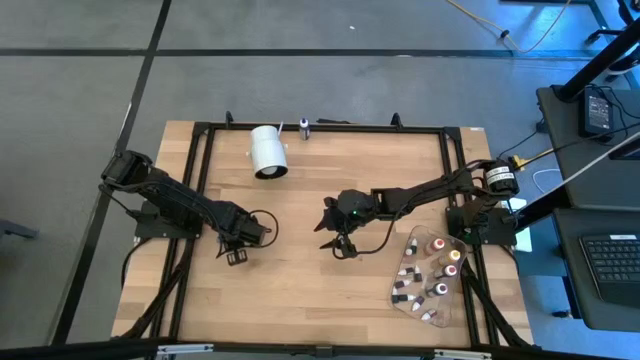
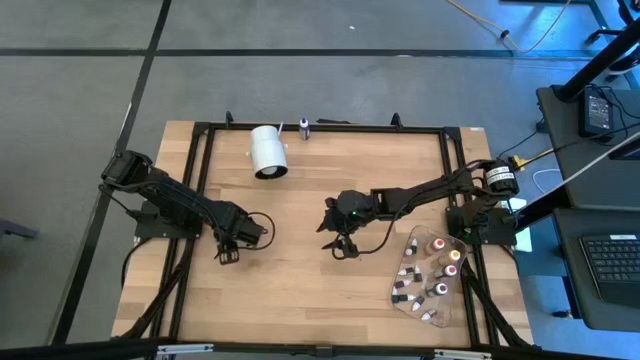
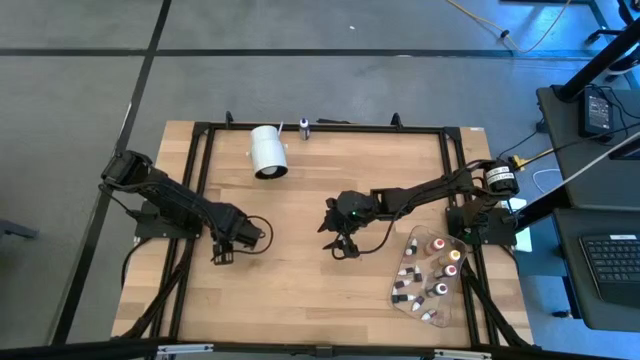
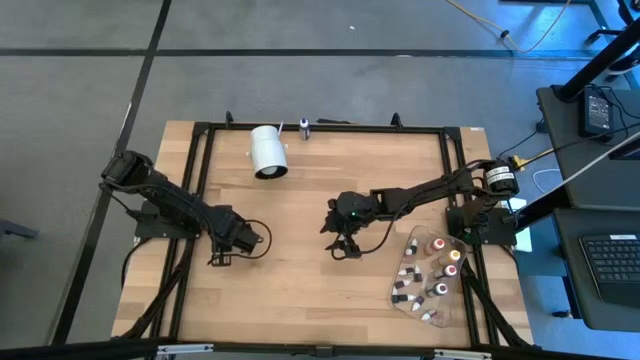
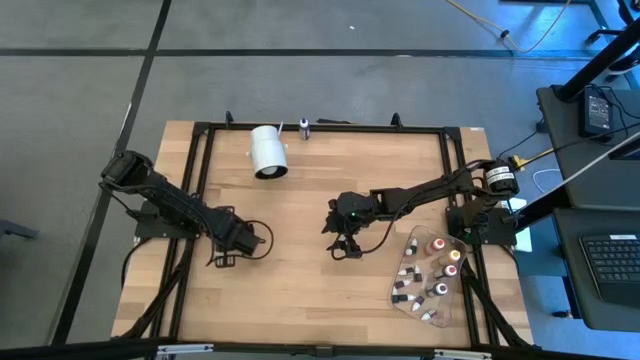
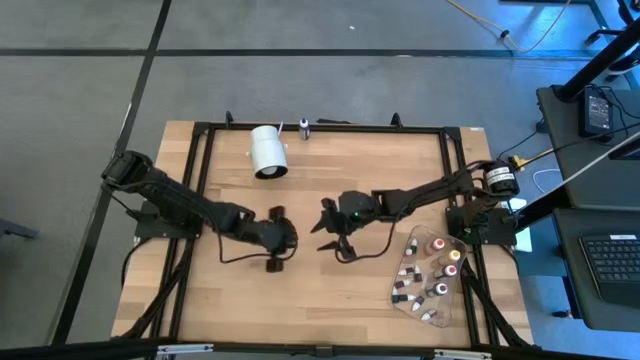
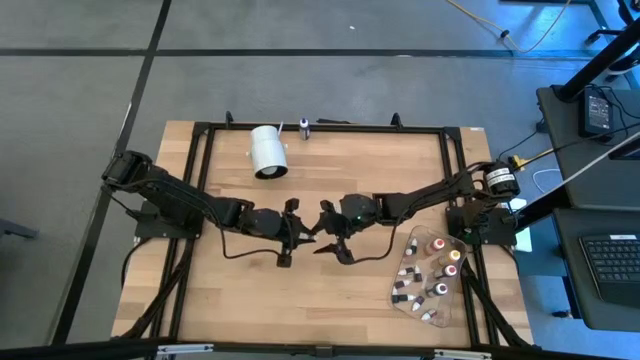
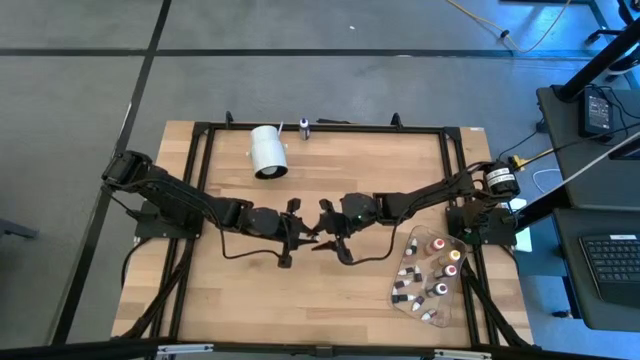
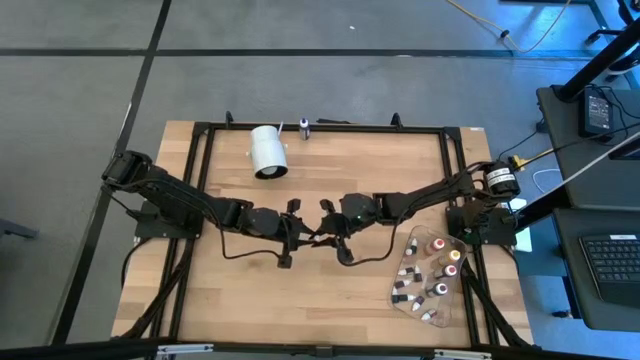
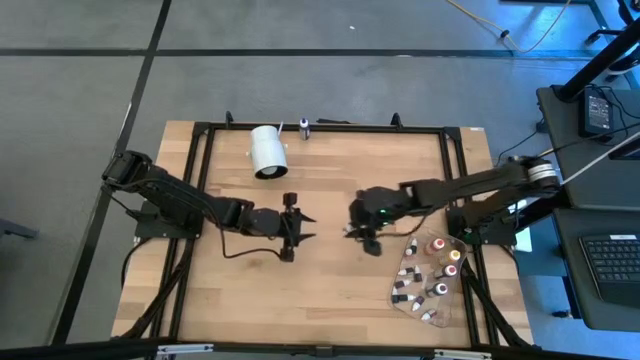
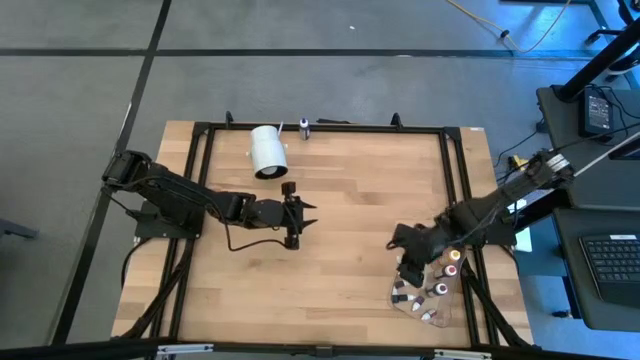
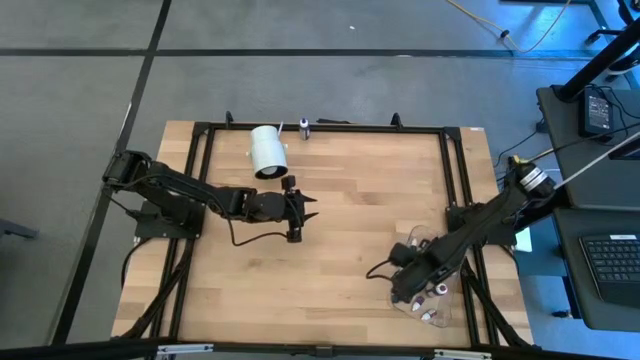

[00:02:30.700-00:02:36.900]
Task: Pick & Place food coloring
Put the small blue food coloring bottle into the transparent bin

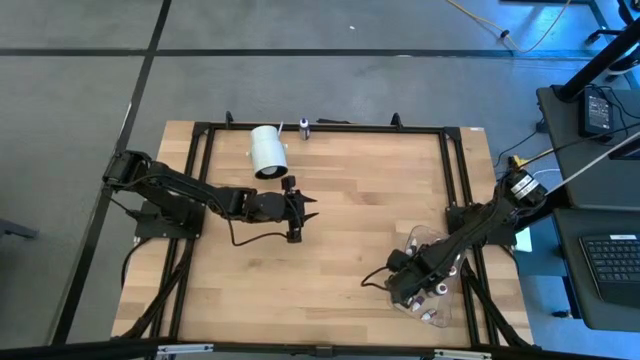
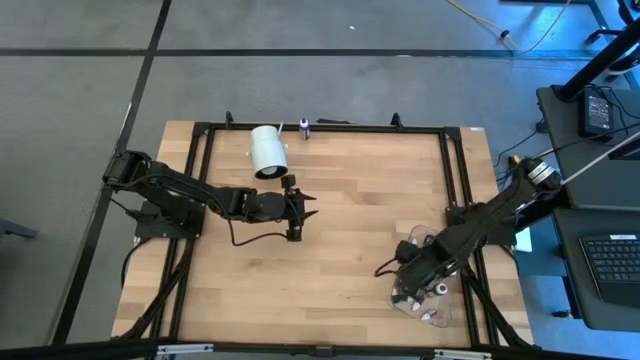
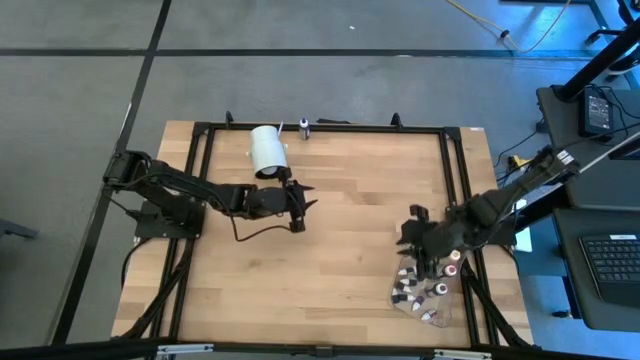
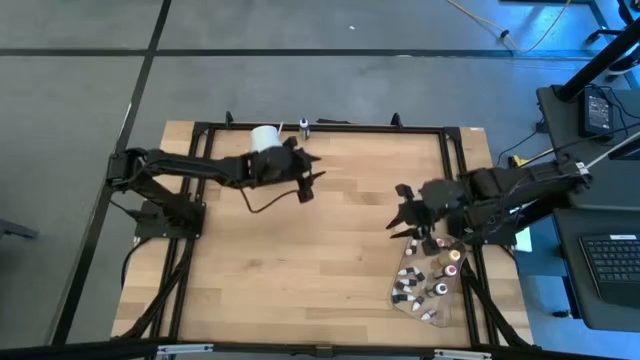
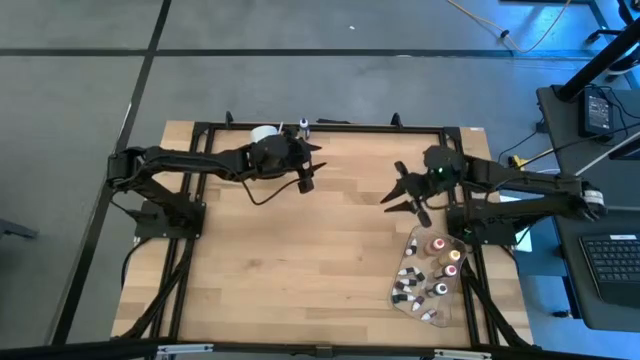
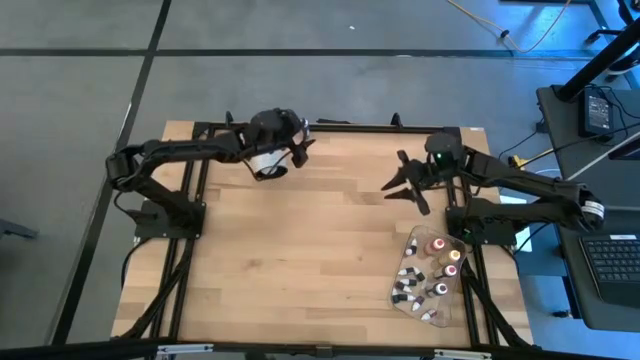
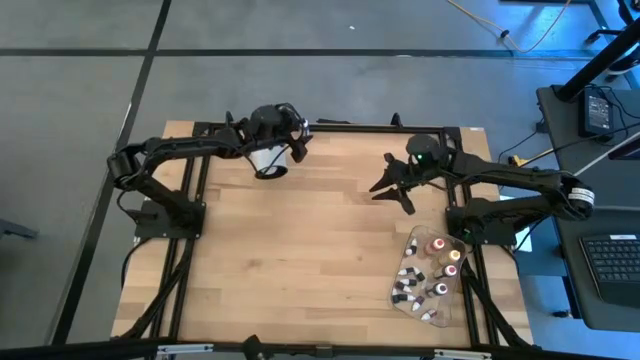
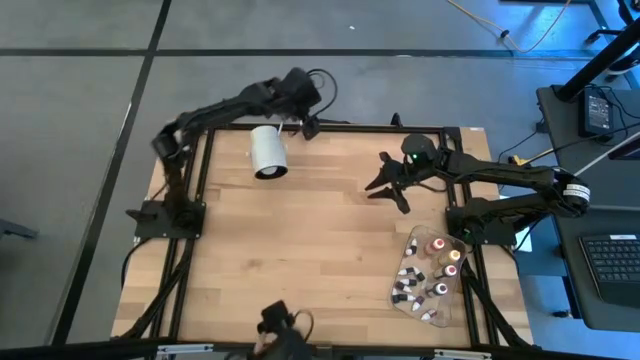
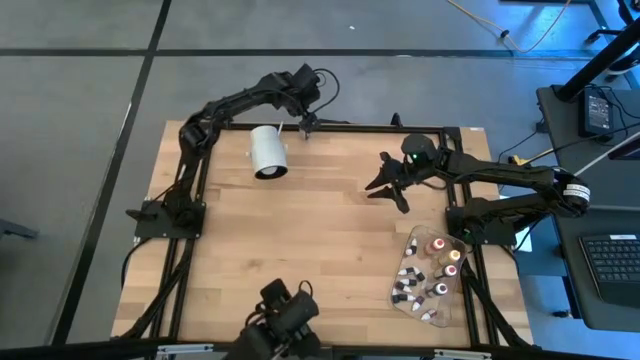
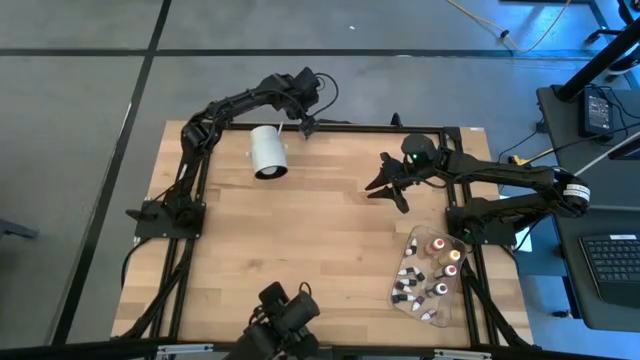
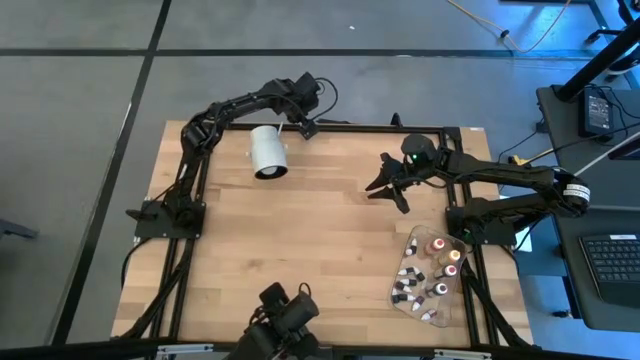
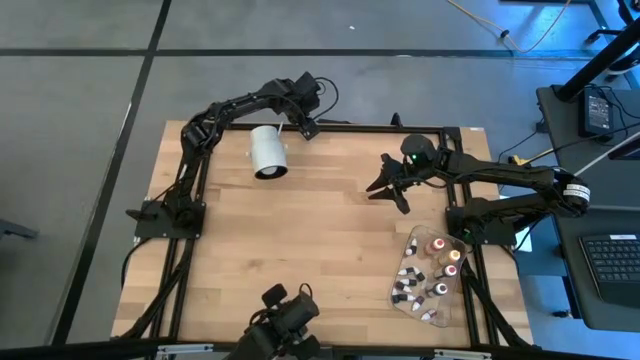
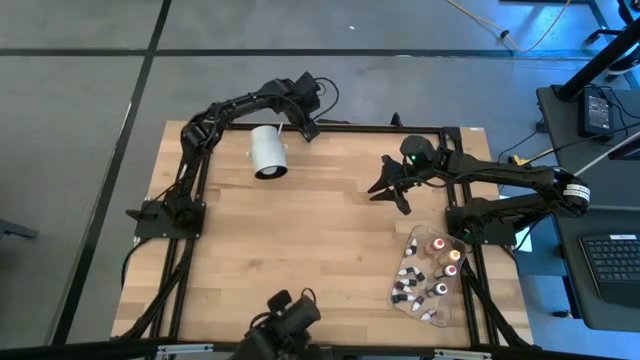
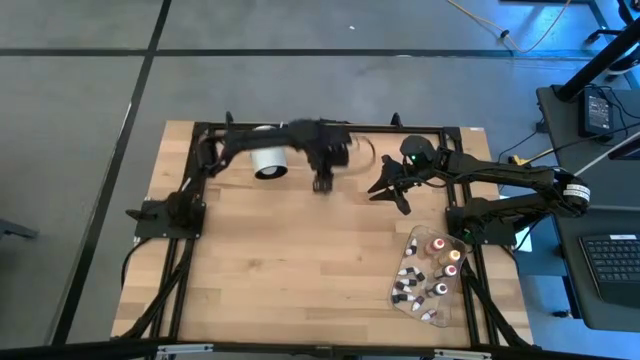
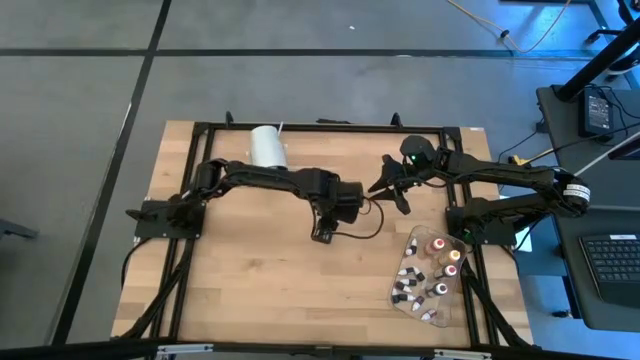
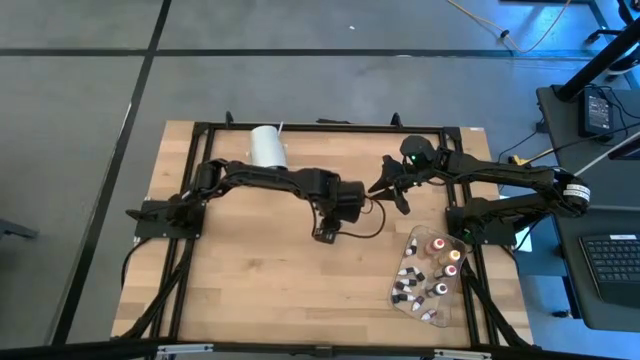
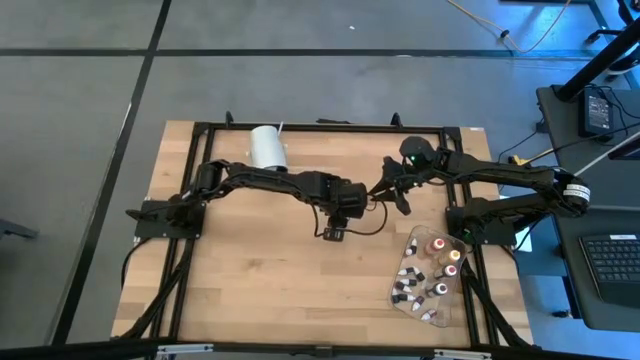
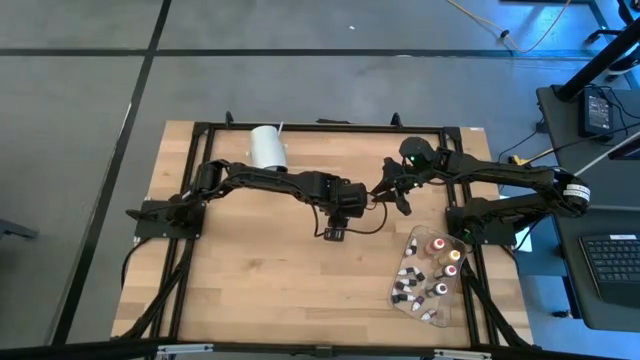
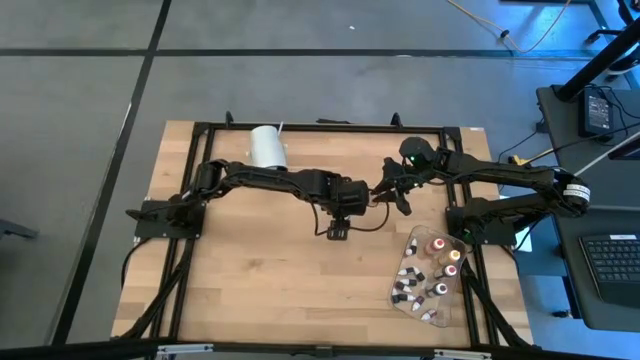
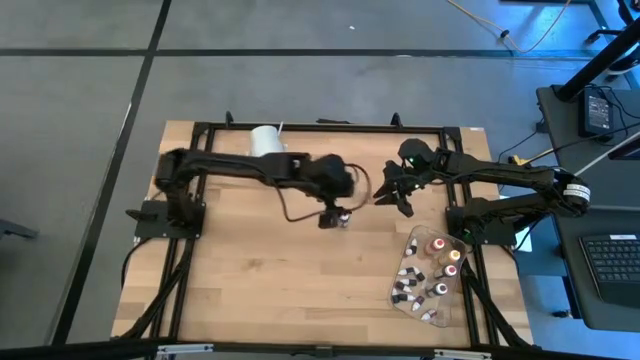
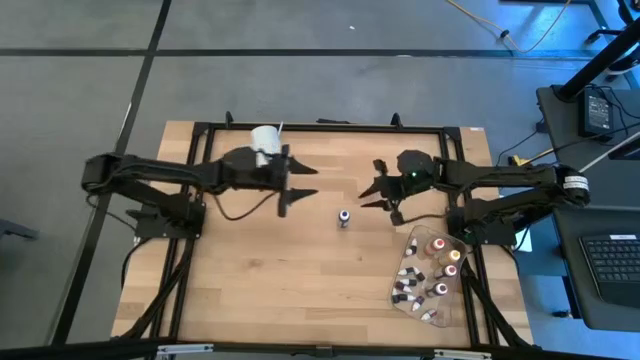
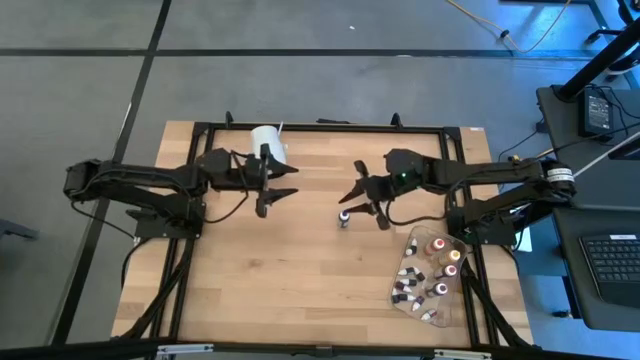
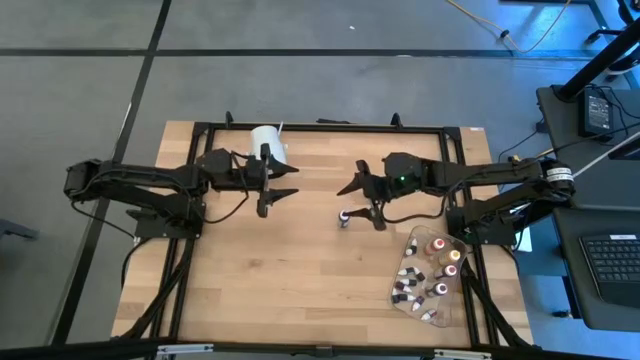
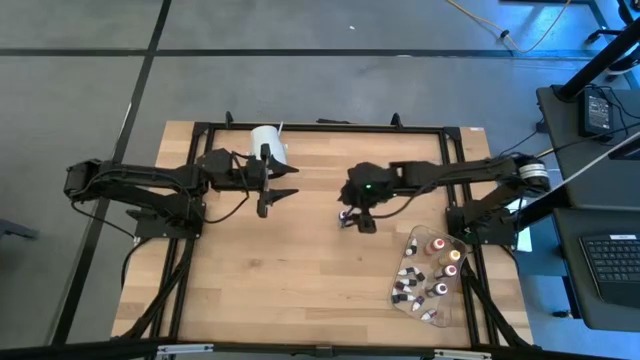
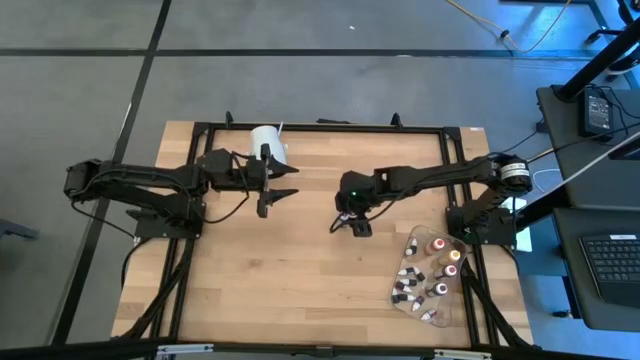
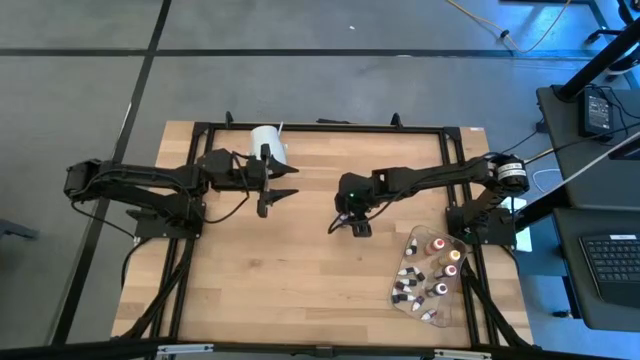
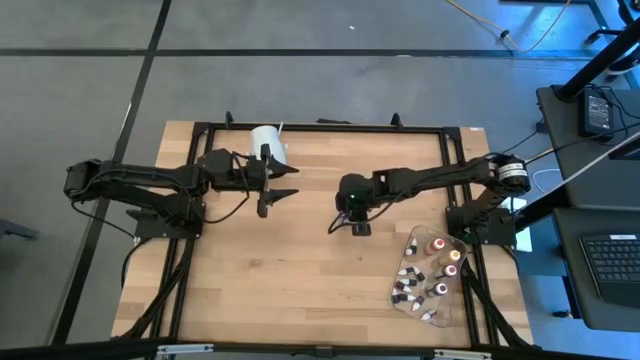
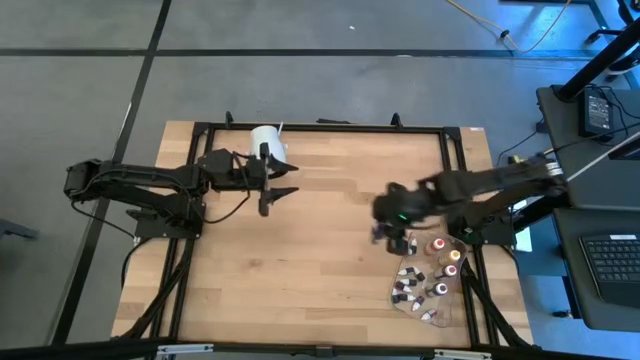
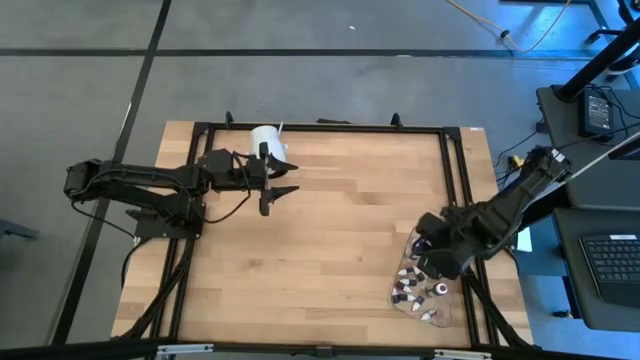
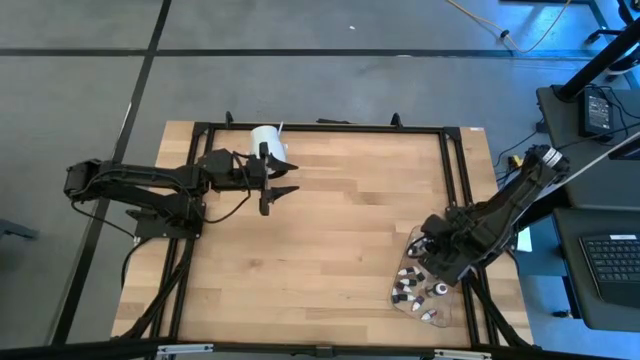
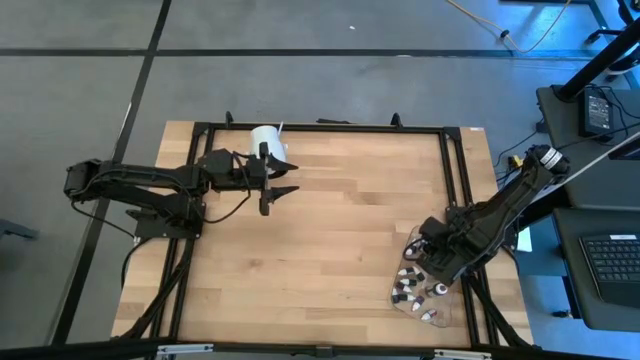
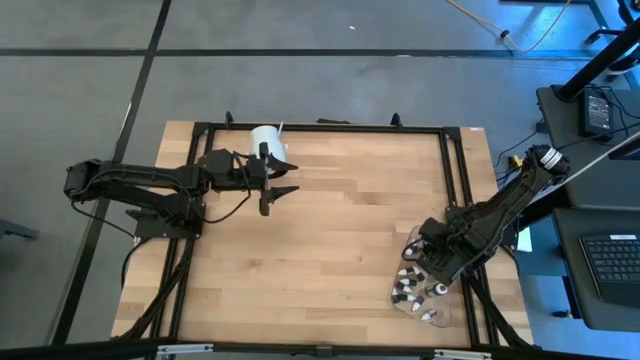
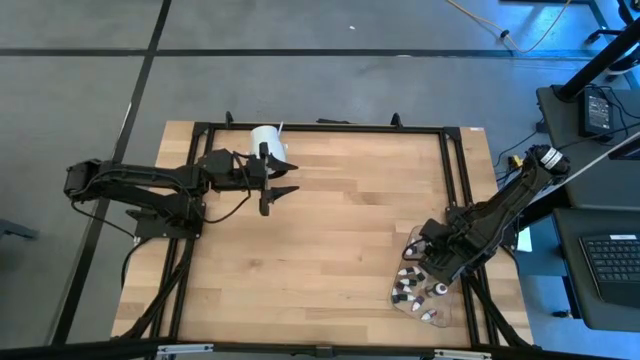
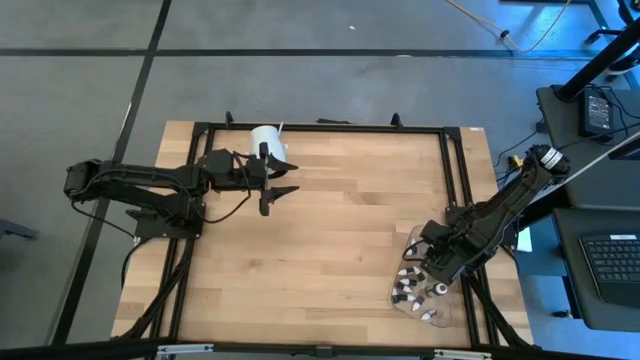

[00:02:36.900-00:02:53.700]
Put the large blue food coloring bottle into the transparent bin
